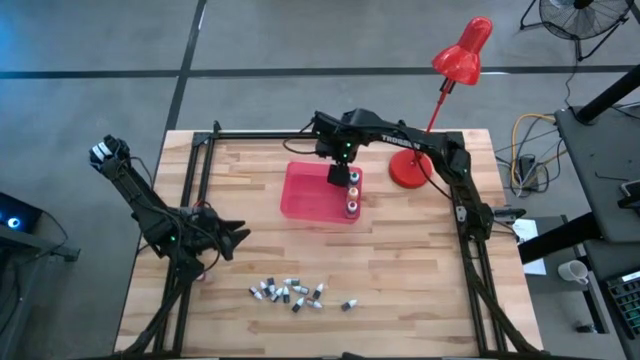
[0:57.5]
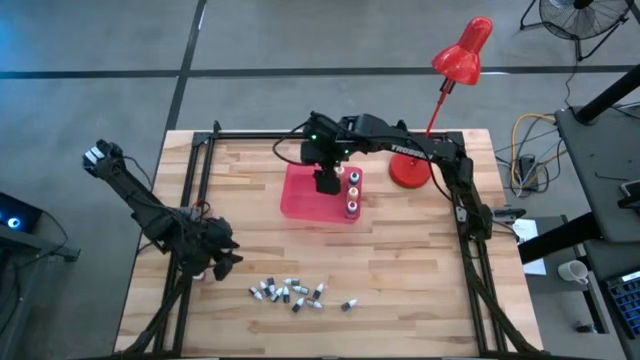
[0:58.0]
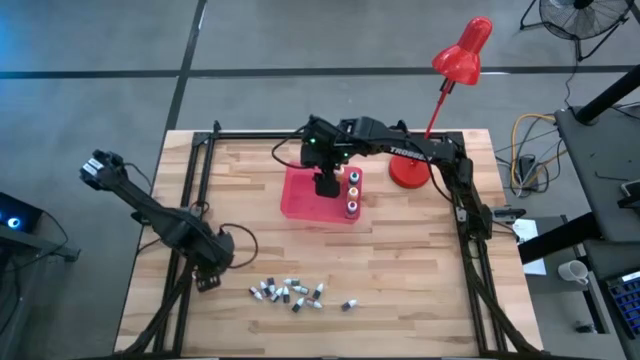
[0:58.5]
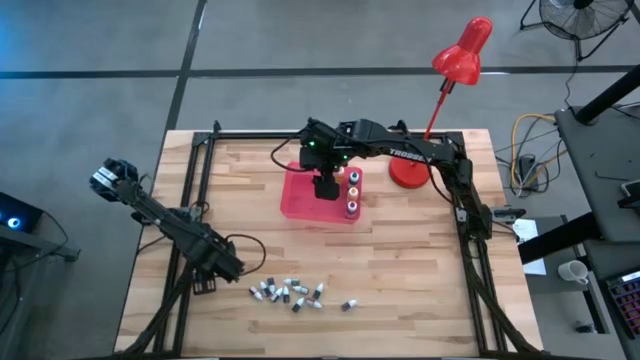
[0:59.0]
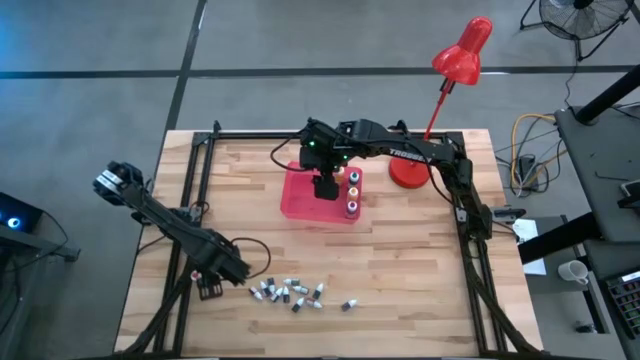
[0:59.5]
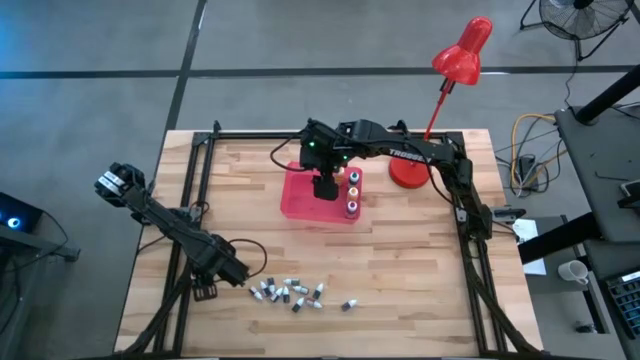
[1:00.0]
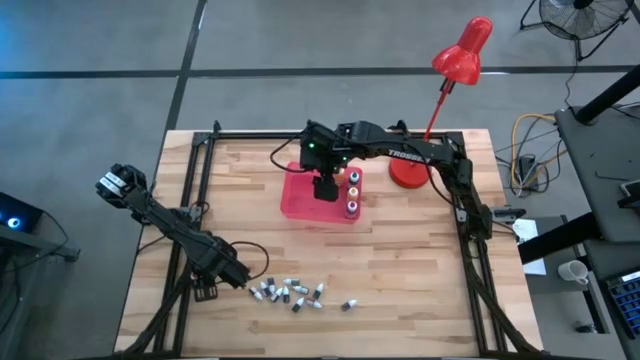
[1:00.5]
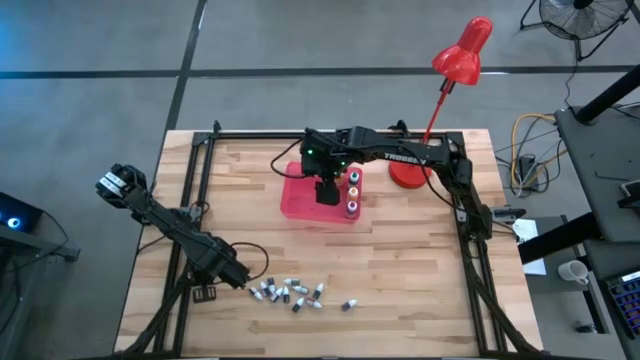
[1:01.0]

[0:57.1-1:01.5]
Task: Pick & Place food coloring
Put the big orange food coloring bottle into the pink bin

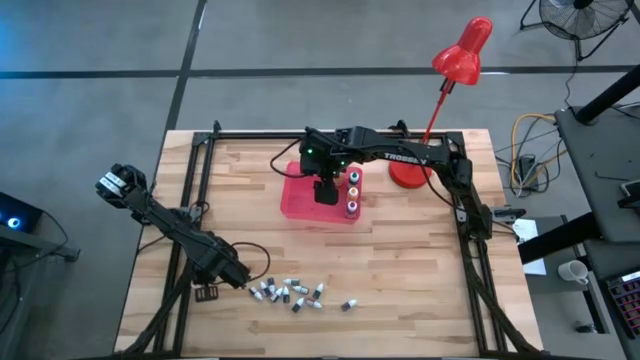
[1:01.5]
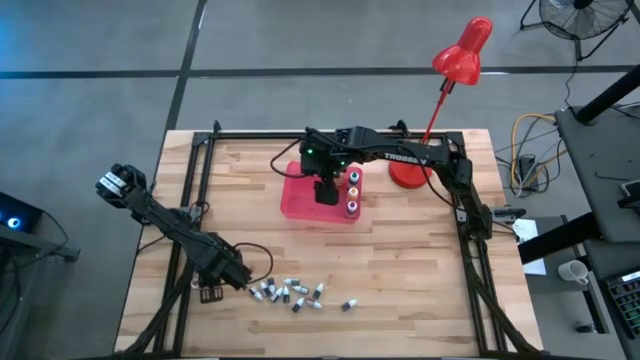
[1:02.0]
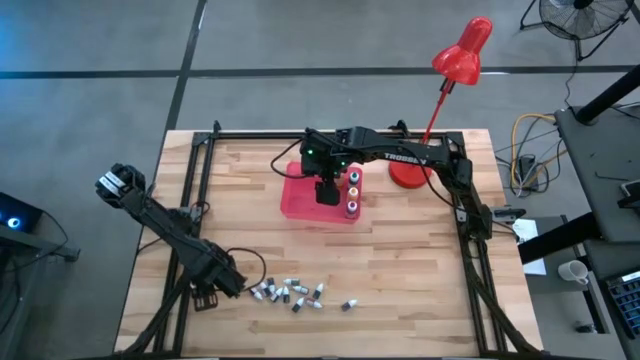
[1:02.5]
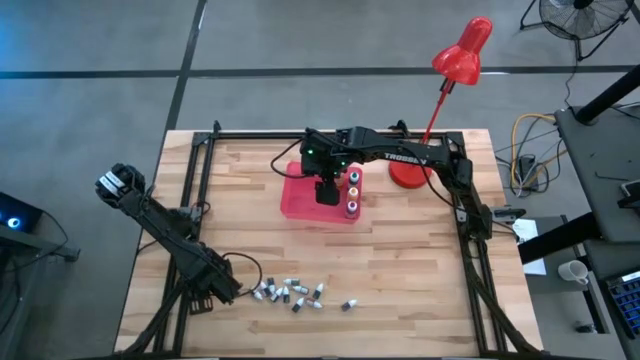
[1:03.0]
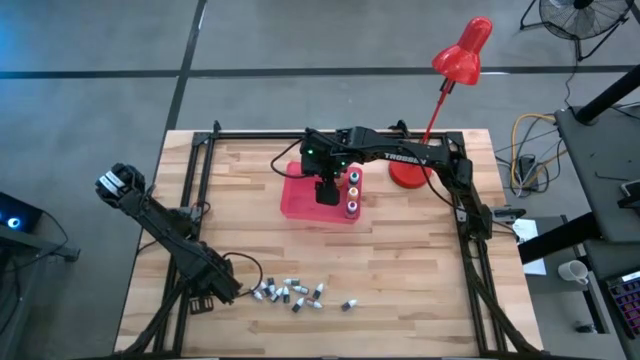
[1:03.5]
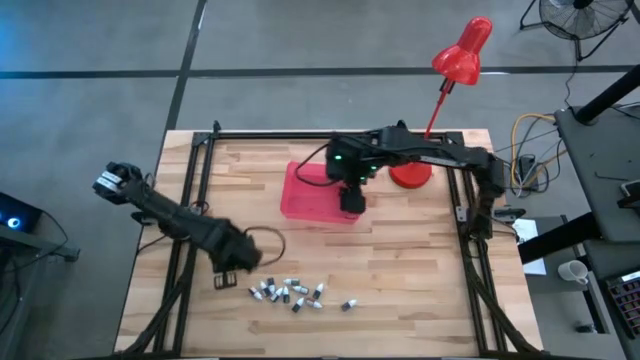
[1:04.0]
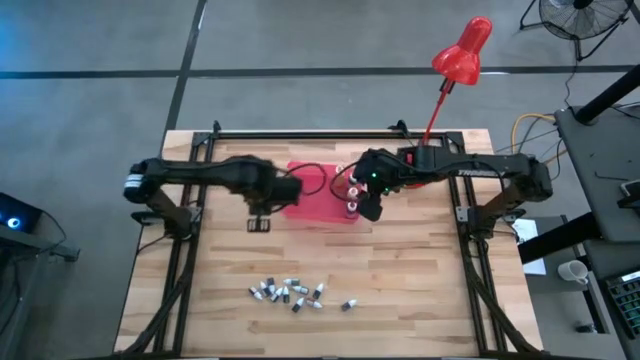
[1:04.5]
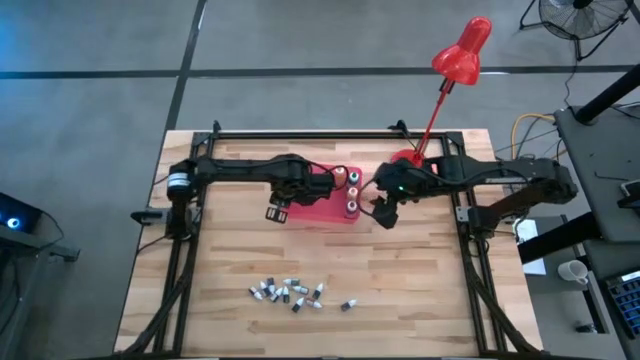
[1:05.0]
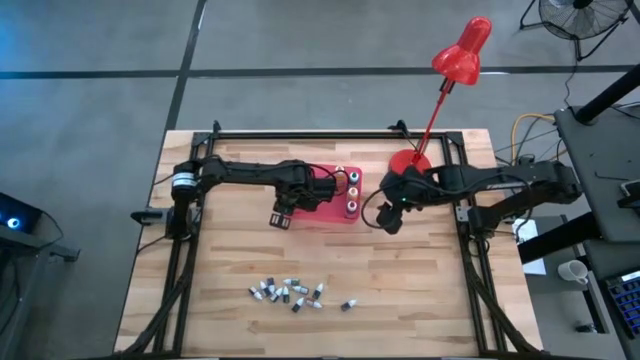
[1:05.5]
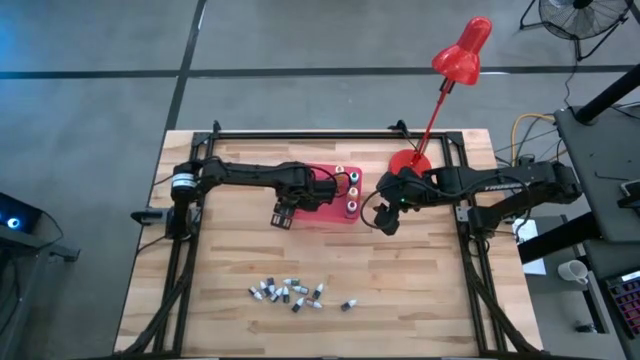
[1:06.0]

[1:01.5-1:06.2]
Put the big orange food coloring bottle into the pink bin

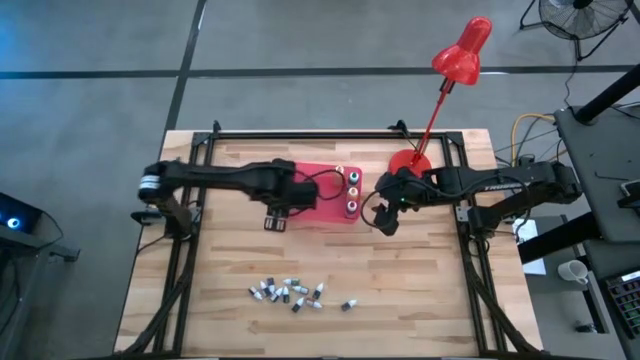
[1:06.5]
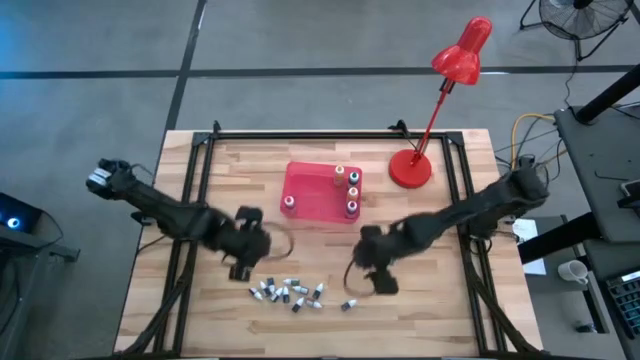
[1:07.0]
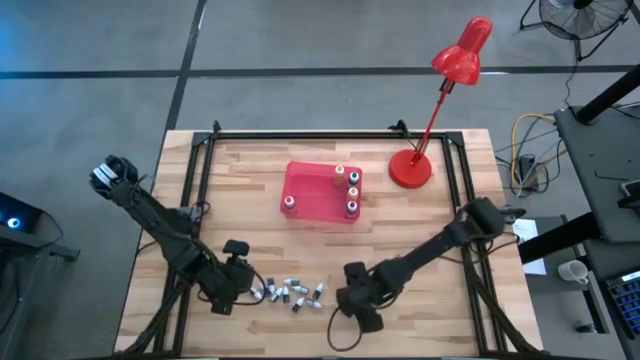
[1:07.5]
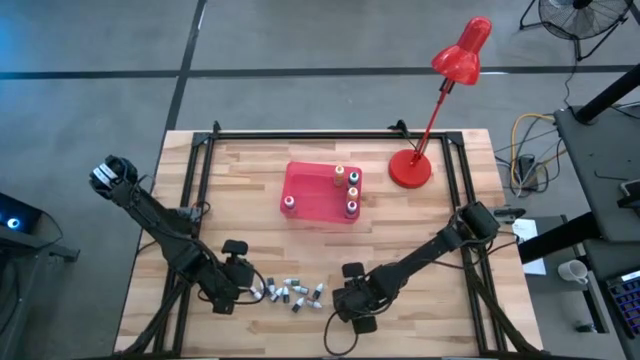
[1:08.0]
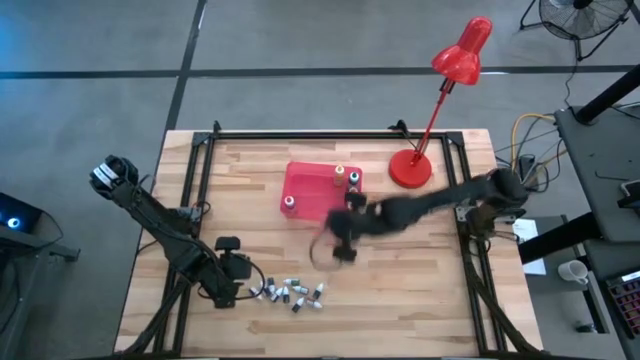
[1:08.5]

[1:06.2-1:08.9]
Put the small purple food coloring bottle into the pink bin

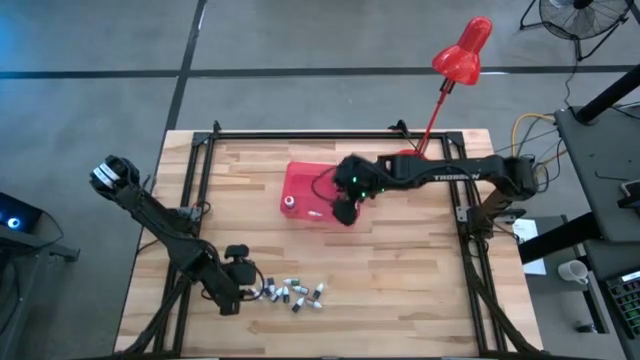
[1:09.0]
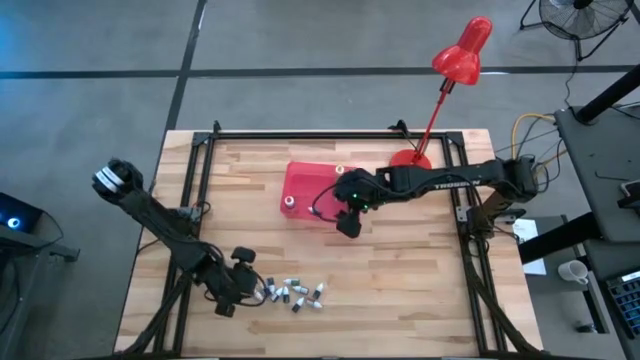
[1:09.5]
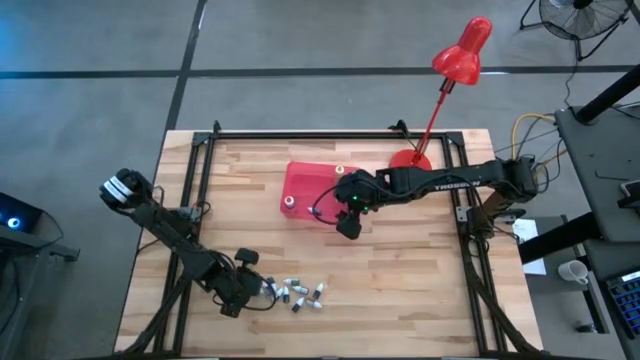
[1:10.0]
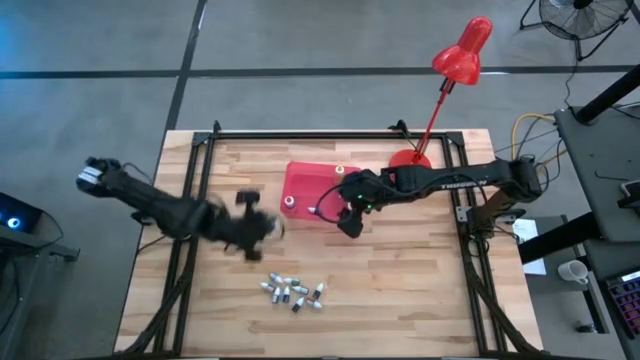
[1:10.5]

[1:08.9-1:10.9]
Put the small red food coloring bottle into the pink bin

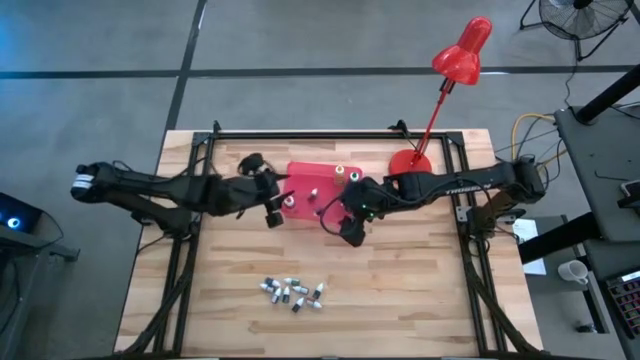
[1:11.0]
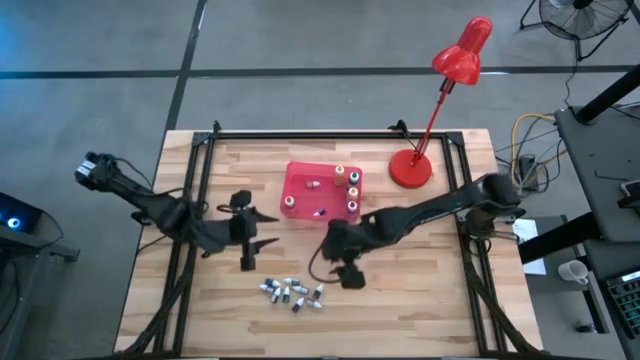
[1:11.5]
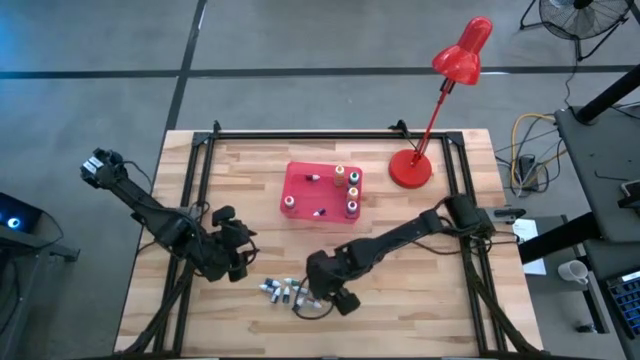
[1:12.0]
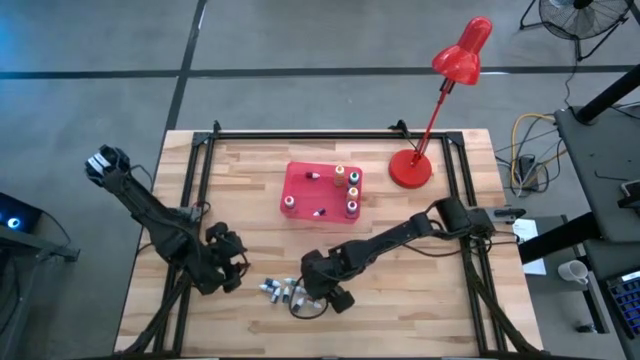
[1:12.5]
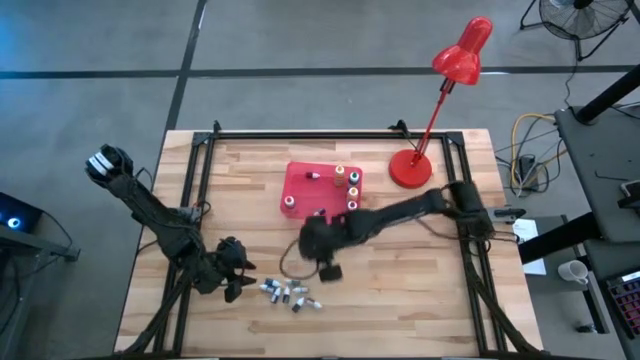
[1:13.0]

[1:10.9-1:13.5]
Put the small green food coloring bottle into the pink bin

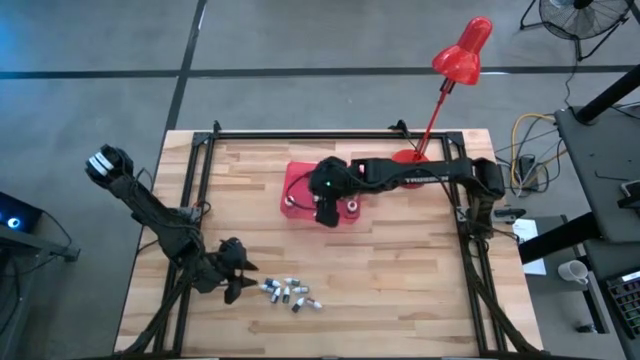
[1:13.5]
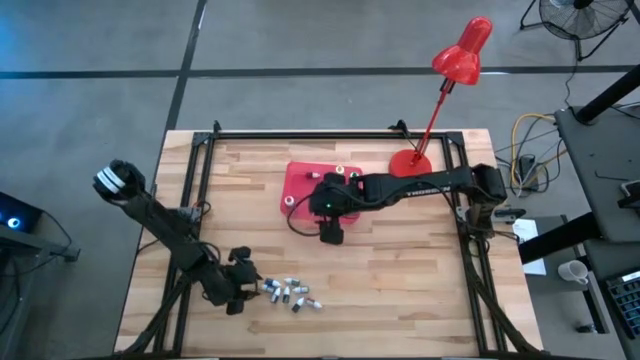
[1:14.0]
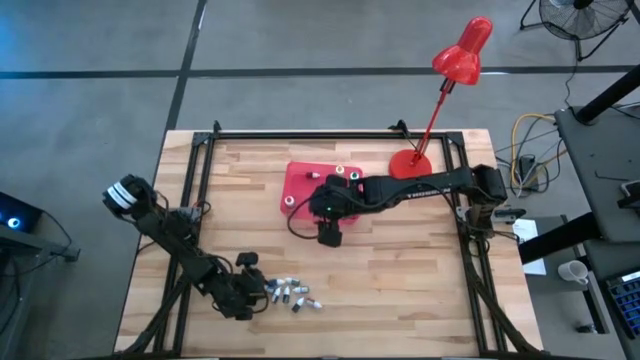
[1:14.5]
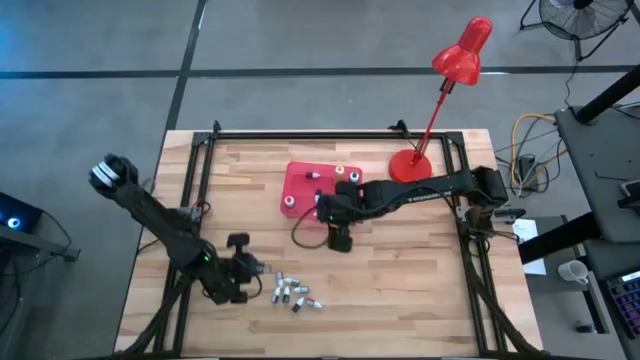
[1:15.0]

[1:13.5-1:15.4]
Put the small black food coloring bottle into the pink bin

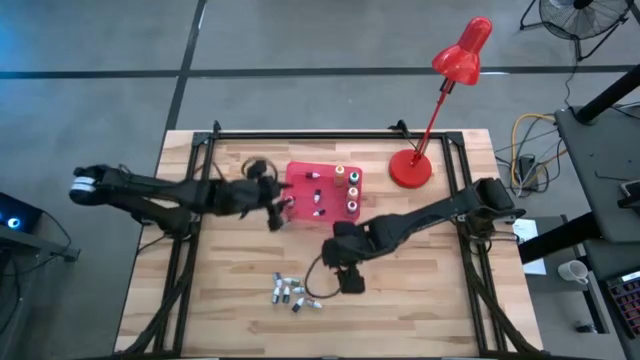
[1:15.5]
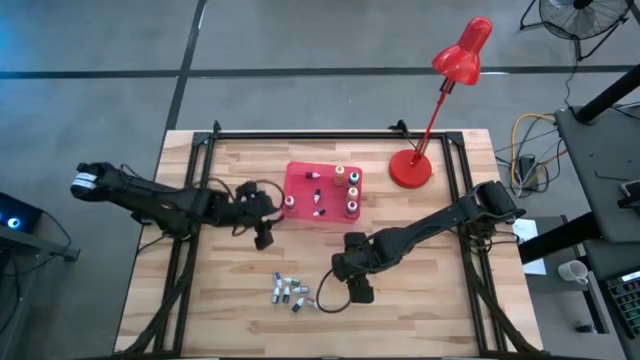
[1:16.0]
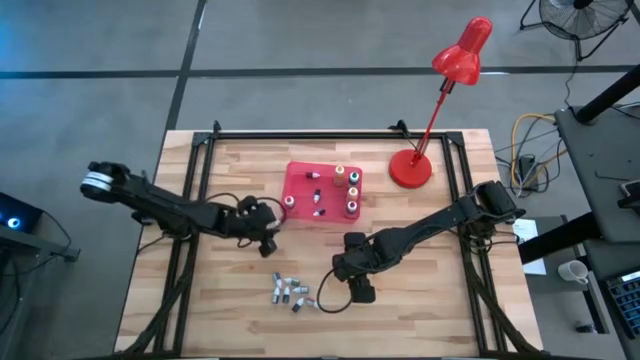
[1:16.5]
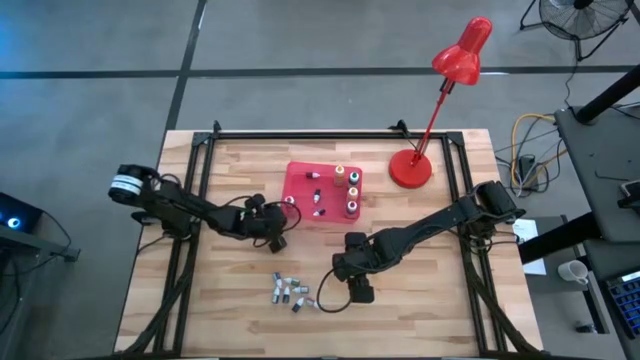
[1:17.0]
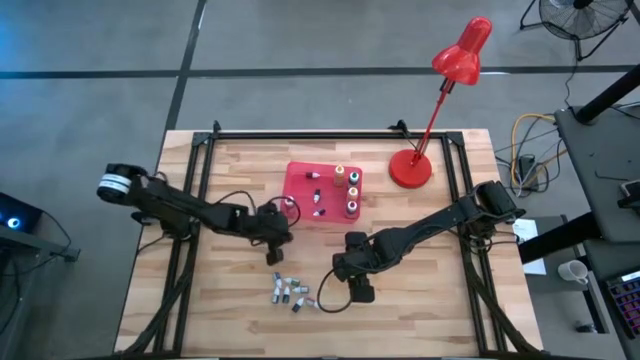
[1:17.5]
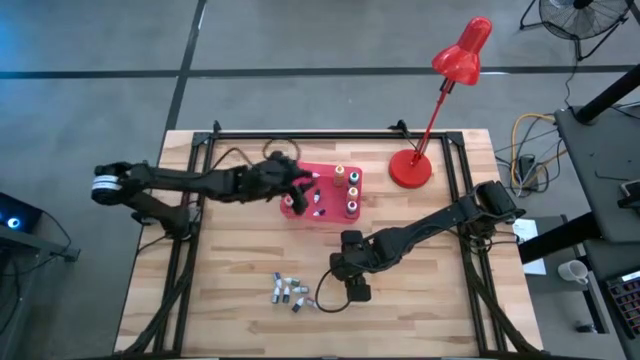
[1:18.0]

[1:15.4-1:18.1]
Put the small red food coloring bottle into the pink bin
